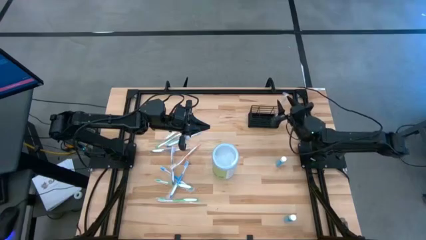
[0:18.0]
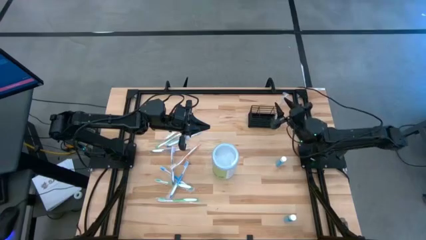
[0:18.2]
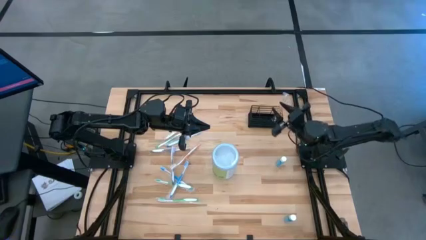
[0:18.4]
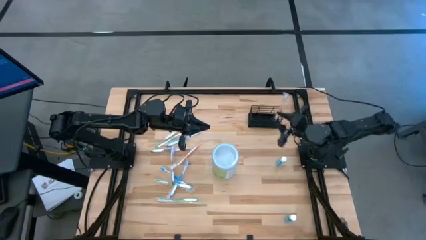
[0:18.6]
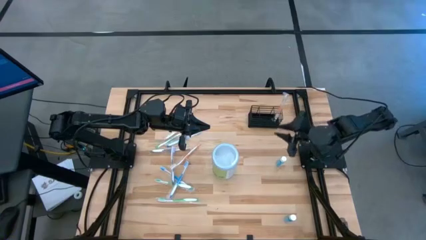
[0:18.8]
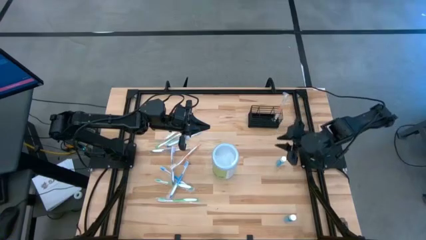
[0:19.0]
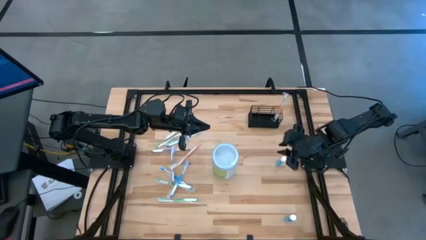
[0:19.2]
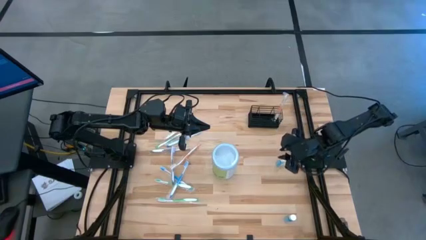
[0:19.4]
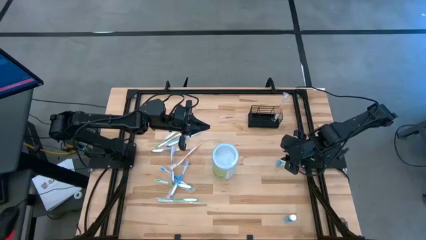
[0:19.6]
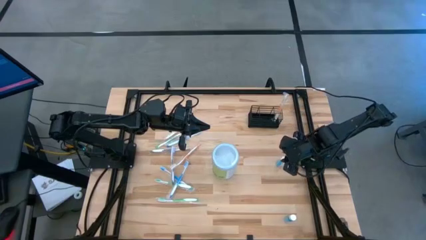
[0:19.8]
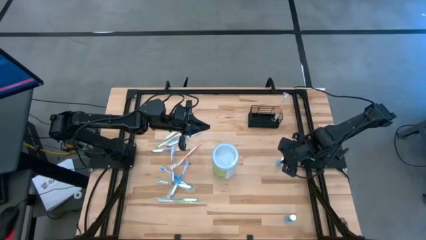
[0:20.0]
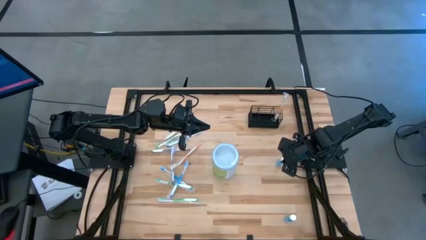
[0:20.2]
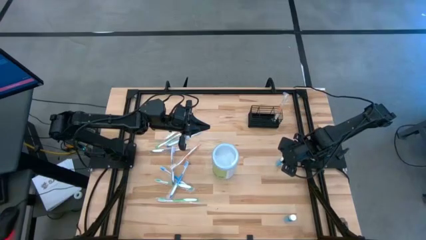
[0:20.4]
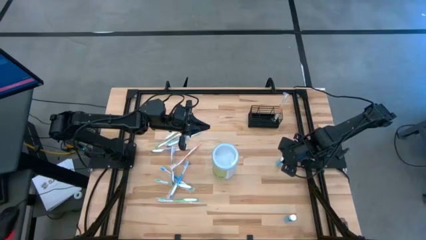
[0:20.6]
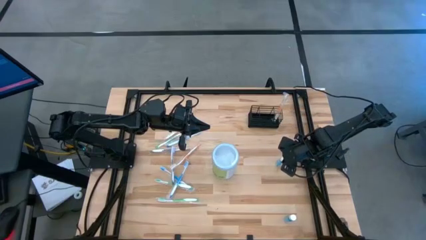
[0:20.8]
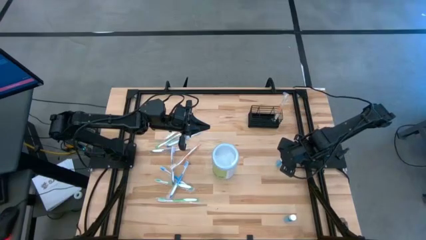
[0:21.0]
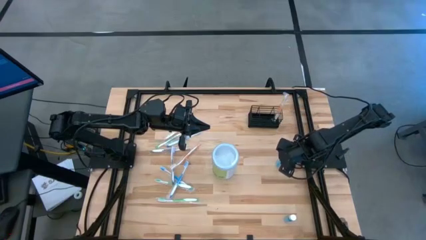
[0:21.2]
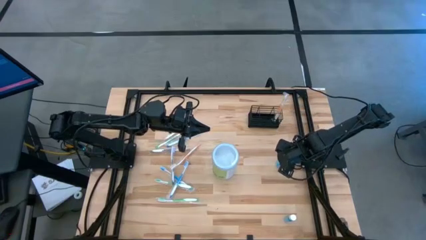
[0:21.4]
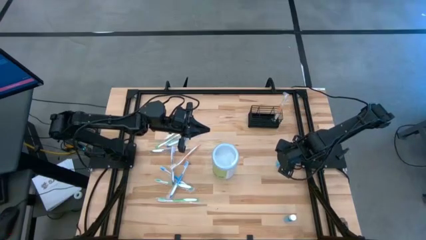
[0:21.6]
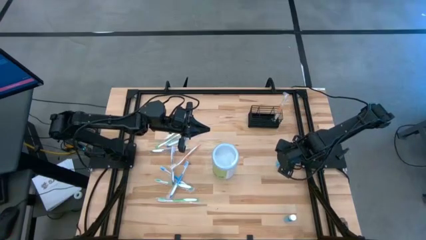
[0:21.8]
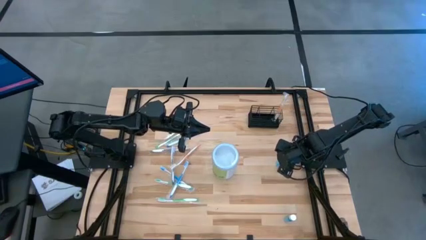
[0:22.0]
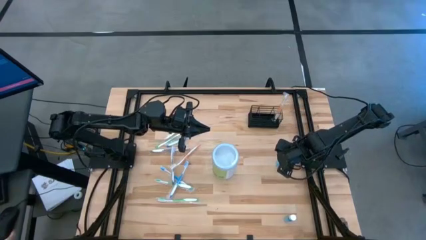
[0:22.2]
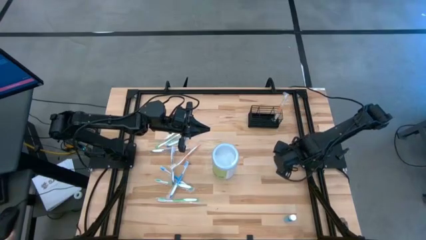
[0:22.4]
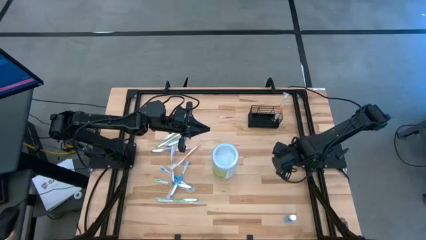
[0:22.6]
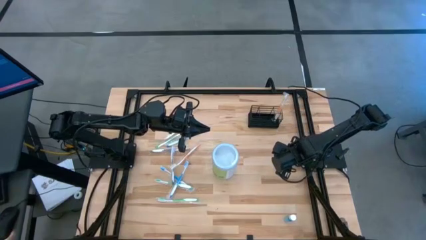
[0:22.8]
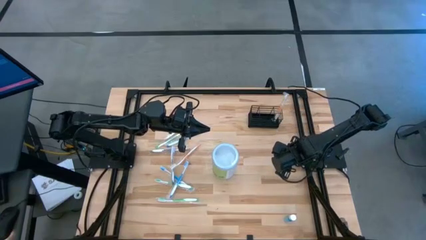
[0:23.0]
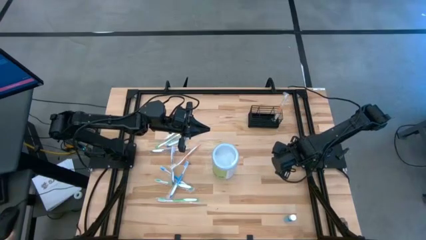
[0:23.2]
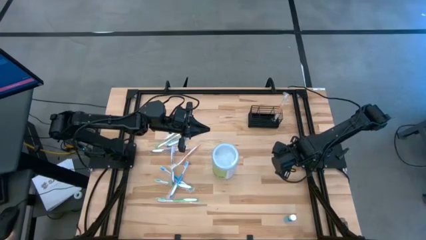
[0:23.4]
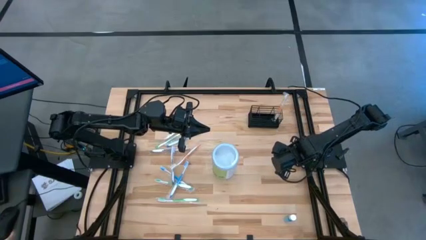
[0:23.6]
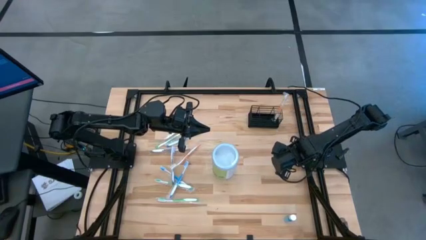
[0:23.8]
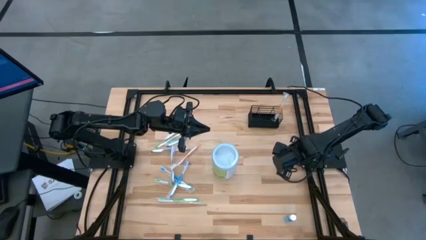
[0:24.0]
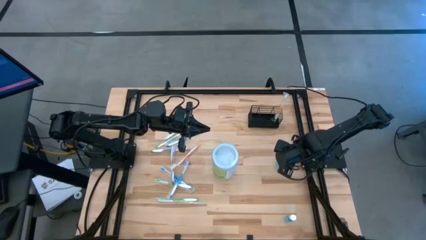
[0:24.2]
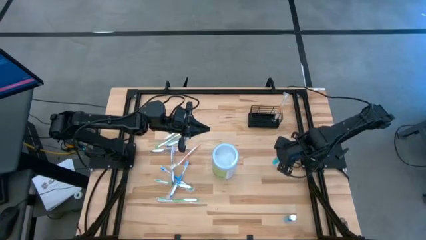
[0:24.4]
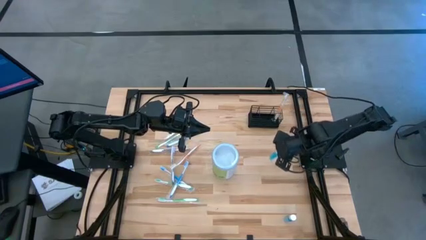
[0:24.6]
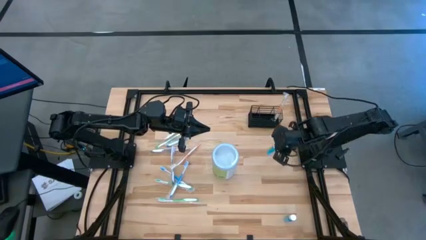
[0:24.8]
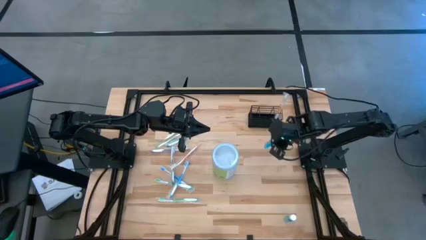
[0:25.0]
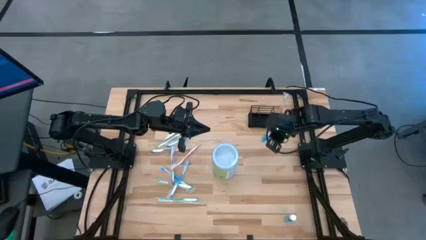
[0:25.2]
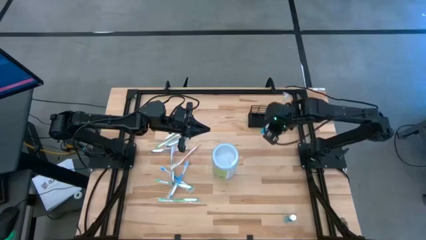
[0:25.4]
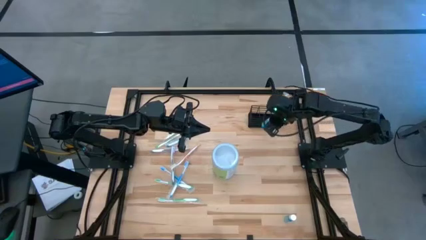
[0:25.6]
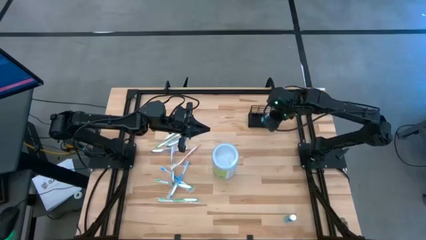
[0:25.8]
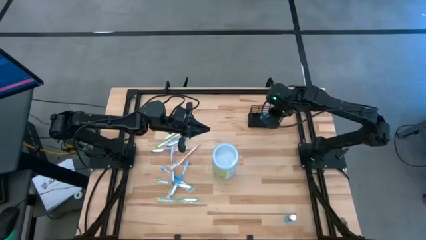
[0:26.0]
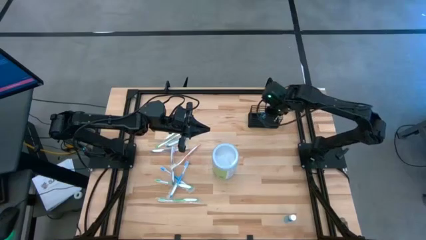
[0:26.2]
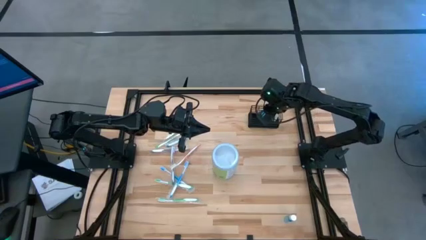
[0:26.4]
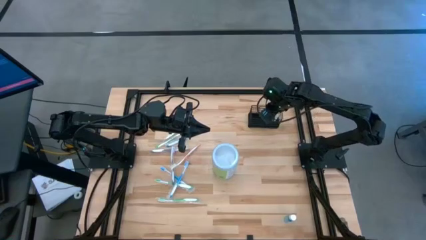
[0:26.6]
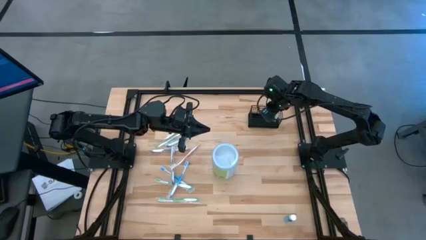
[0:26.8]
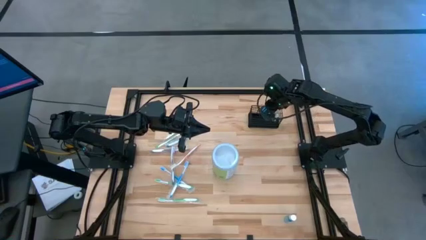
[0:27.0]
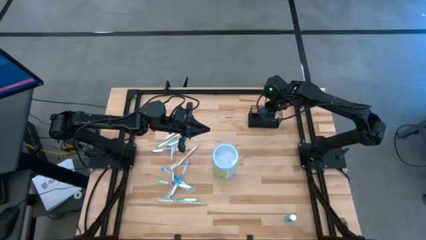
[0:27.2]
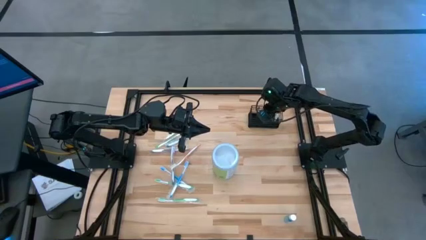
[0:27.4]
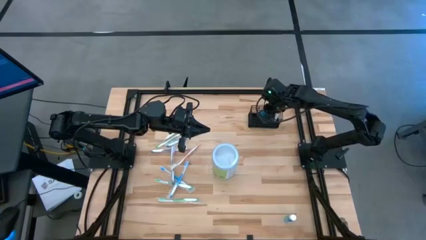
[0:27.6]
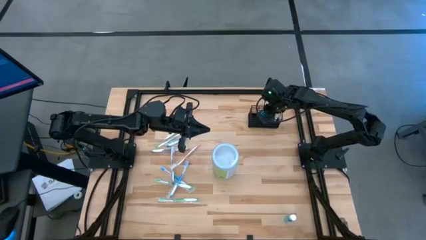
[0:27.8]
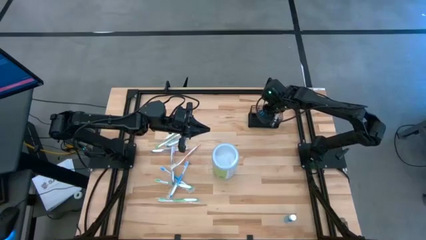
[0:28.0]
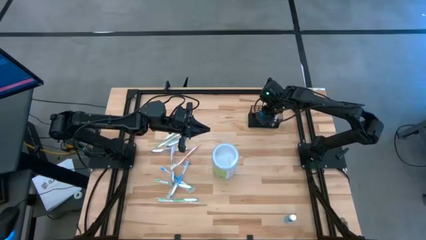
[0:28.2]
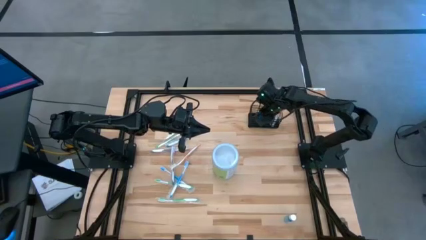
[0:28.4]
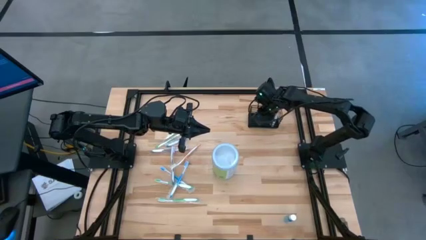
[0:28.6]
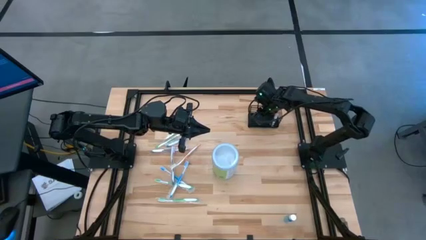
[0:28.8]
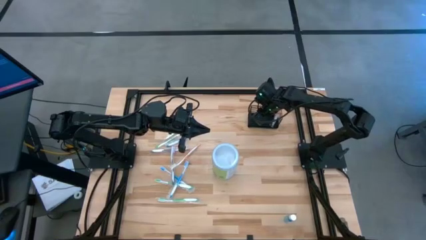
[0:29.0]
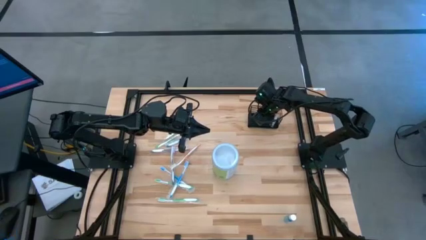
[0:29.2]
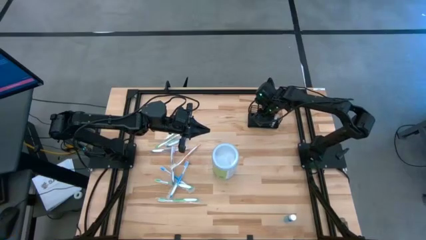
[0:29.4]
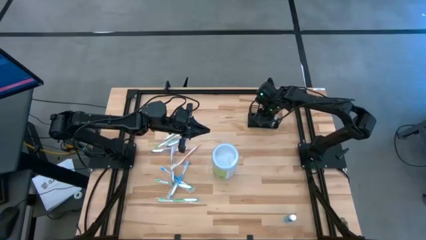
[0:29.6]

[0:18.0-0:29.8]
Task: Pick & Place toothbrushing station
Put the blue mouthwash into the wire organizer
